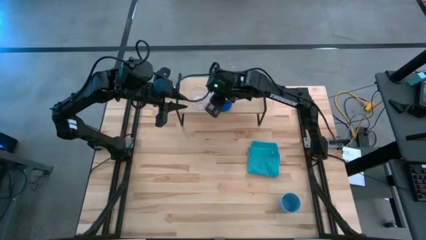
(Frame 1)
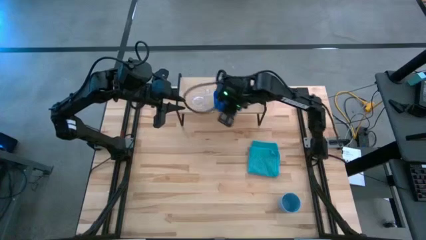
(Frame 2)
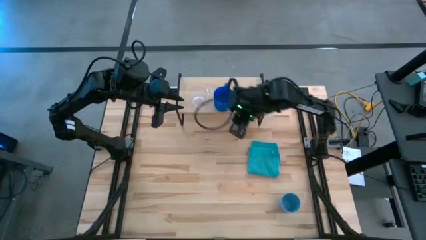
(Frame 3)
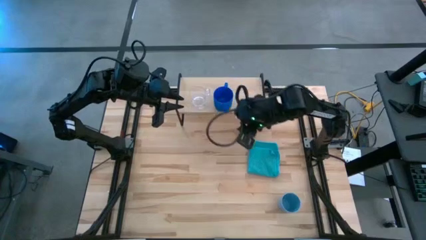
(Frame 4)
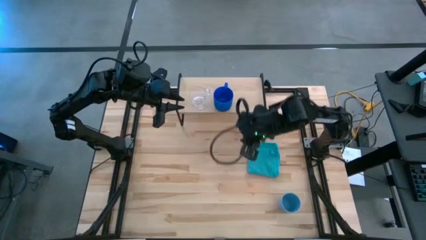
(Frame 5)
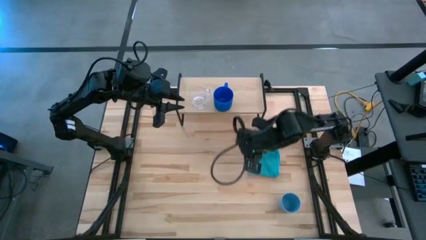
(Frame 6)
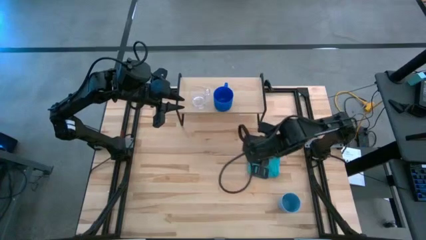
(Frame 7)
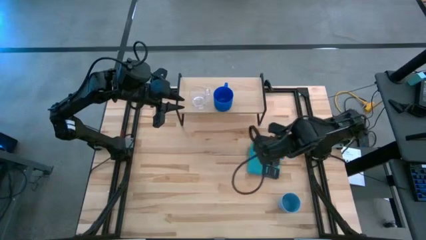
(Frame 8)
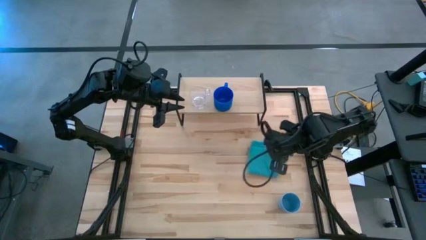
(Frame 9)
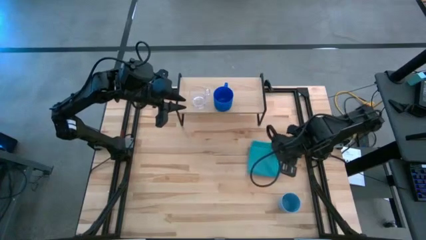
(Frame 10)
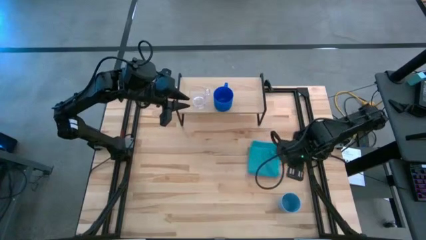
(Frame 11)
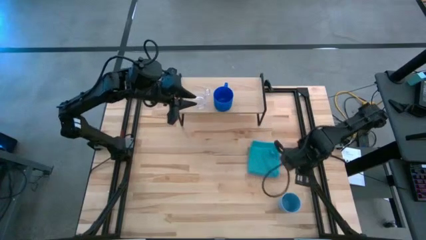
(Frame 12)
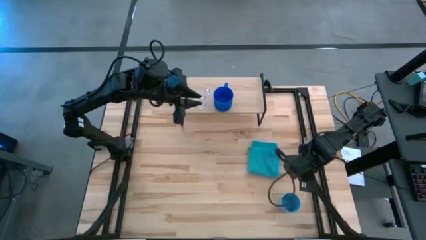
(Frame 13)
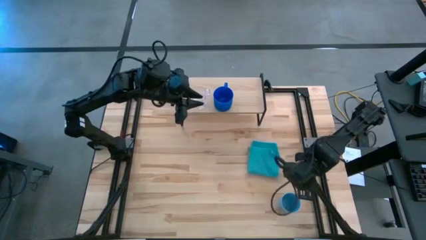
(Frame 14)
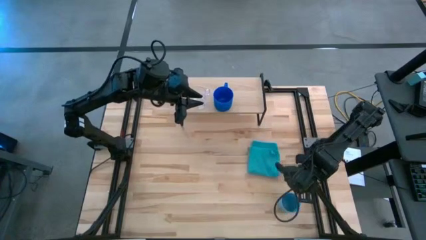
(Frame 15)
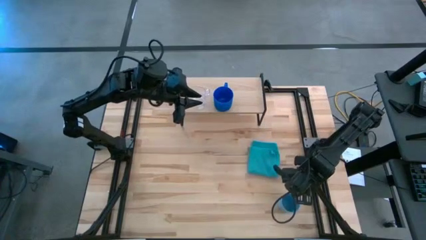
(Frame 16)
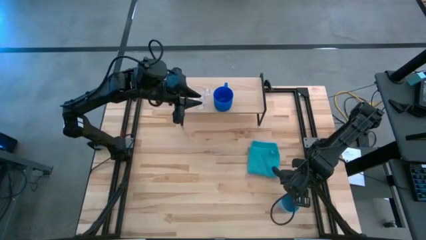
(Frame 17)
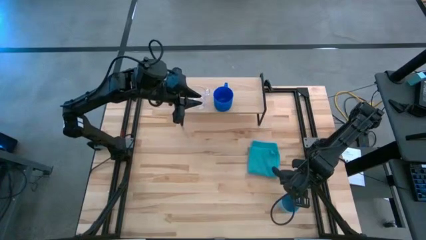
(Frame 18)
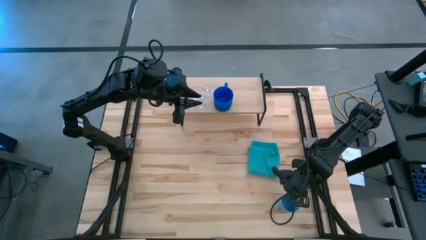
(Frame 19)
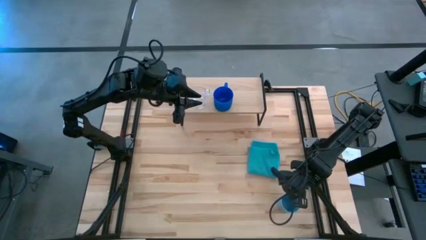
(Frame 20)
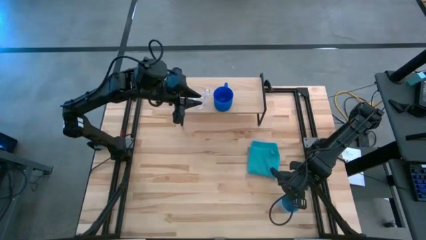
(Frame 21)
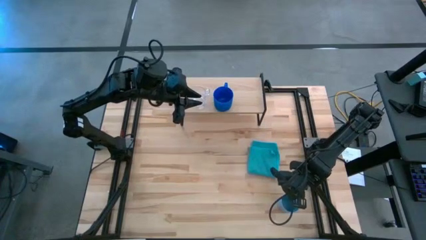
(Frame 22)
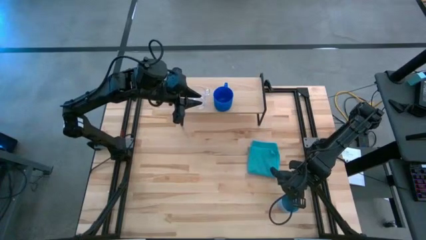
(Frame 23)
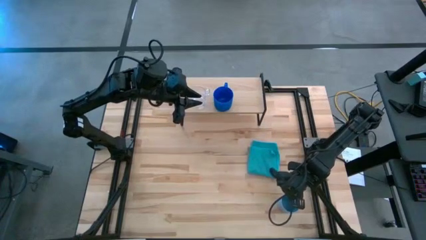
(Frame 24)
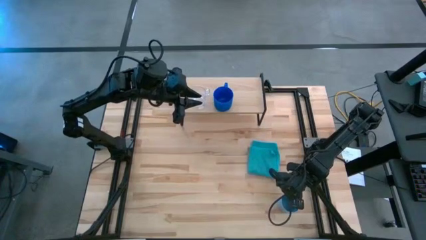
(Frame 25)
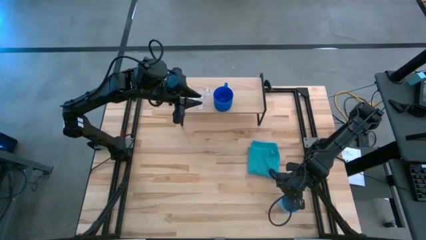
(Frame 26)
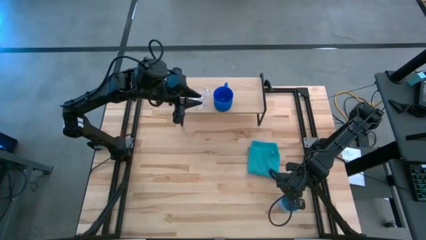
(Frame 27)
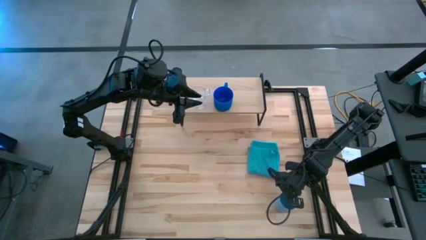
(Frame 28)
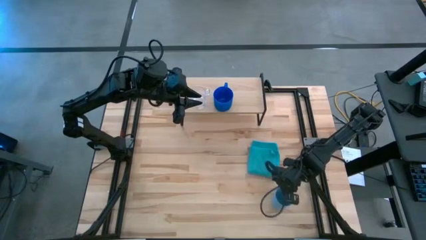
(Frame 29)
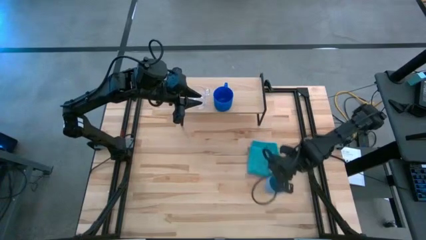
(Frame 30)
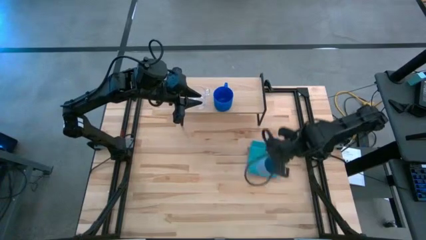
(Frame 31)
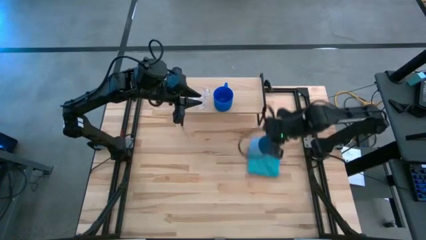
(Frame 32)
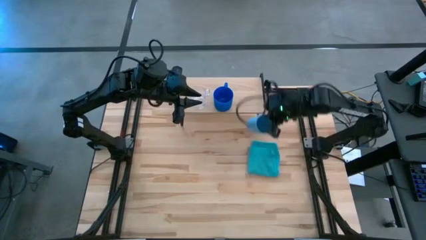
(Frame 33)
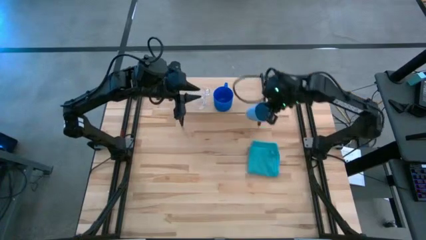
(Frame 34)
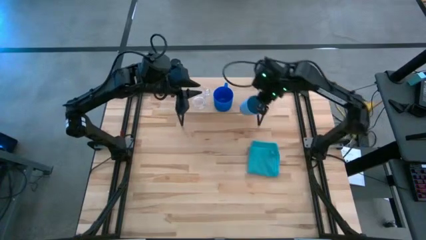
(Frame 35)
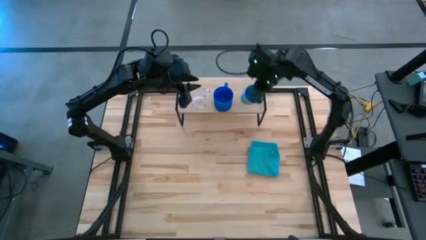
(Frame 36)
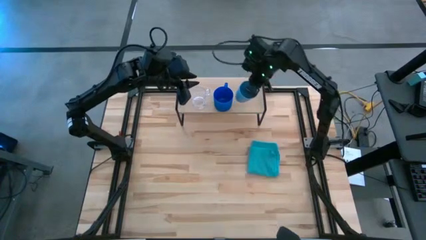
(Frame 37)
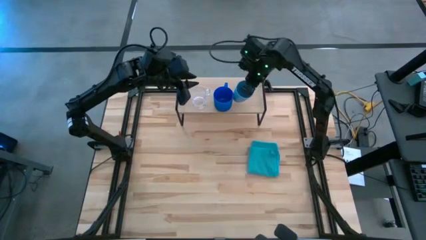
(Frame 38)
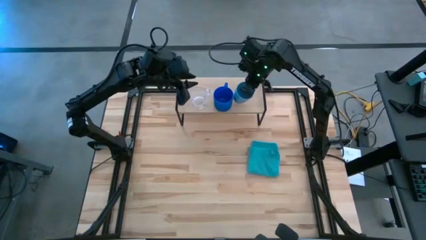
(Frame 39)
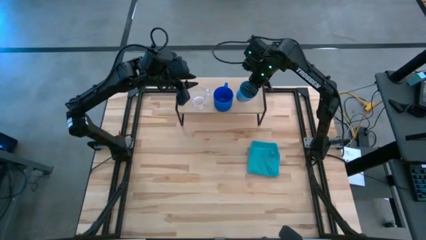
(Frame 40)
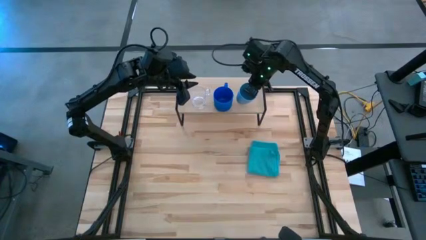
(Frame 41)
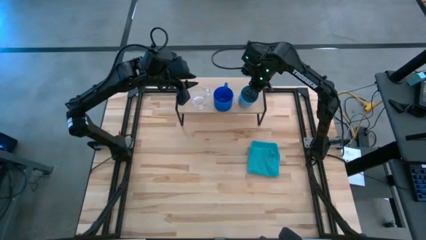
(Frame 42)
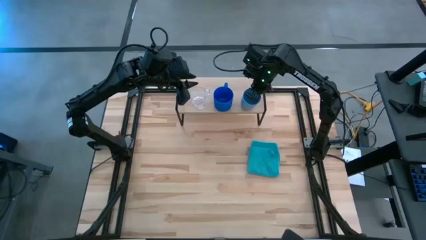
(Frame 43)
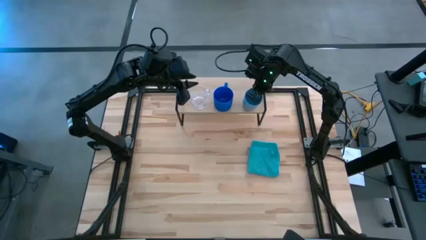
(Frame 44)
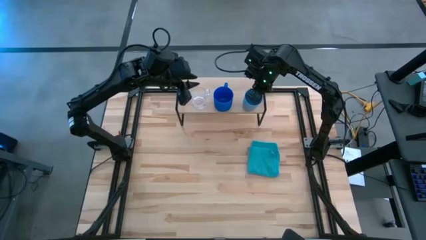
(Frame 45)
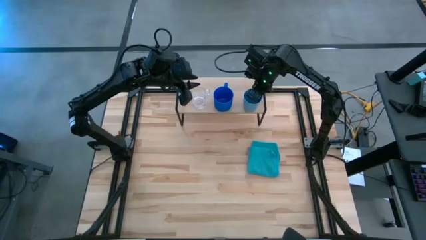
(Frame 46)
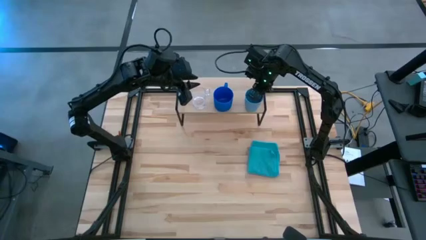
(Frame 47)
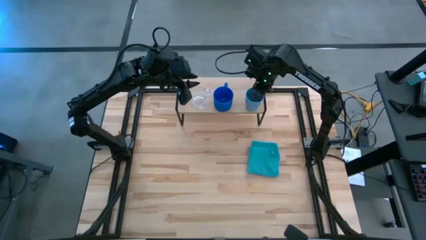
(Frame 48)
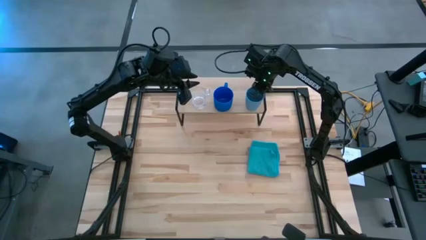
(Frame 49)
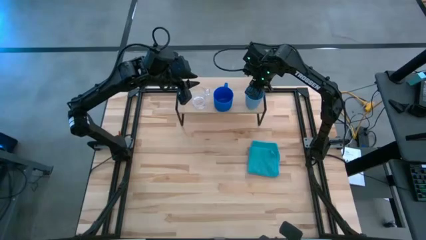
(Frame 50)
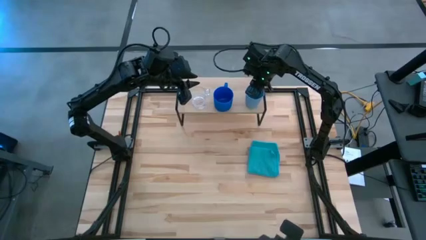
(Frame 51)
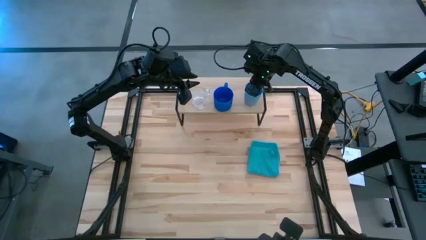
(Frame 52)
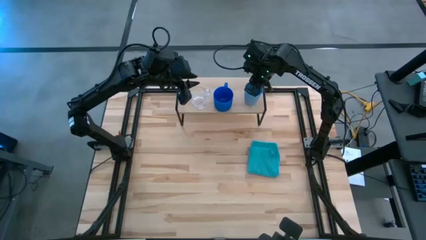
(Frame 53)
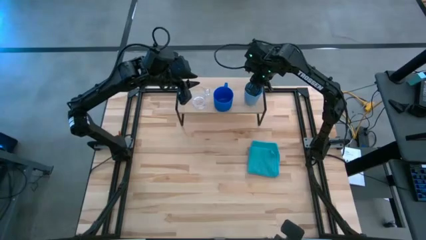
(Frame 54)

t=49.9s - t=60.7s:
Task: Stack small to large cups/mugs on shelf
Put the light blue cup on the shelf

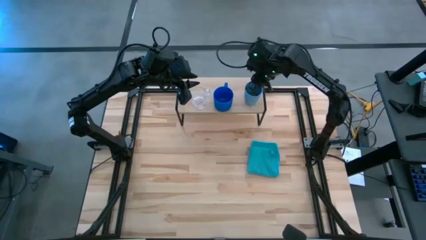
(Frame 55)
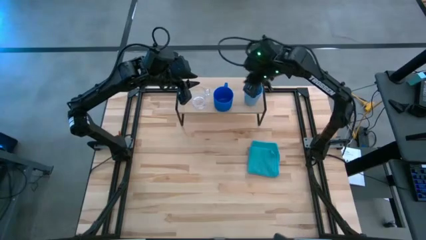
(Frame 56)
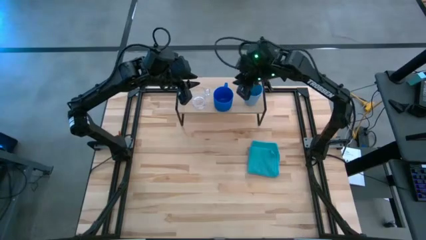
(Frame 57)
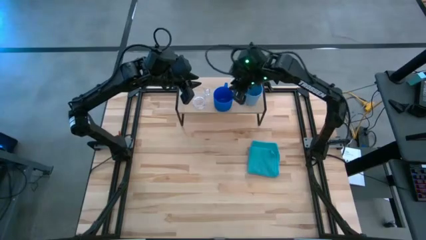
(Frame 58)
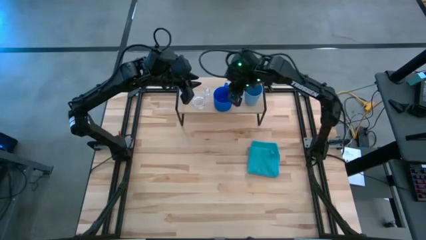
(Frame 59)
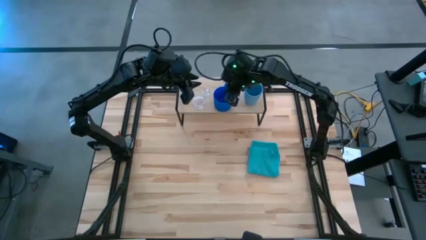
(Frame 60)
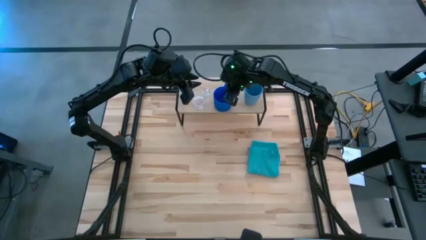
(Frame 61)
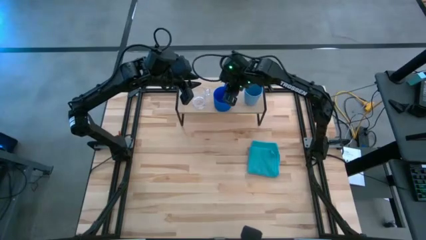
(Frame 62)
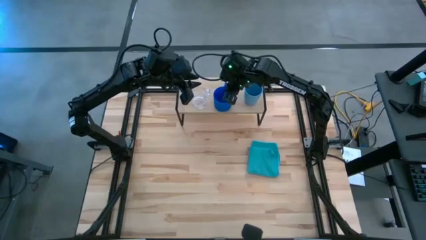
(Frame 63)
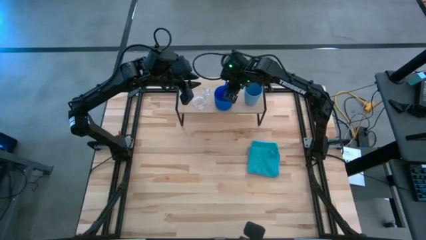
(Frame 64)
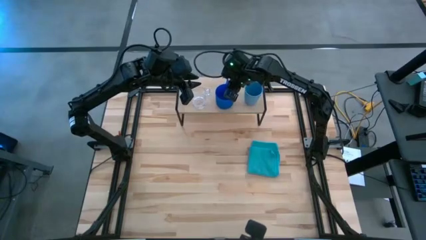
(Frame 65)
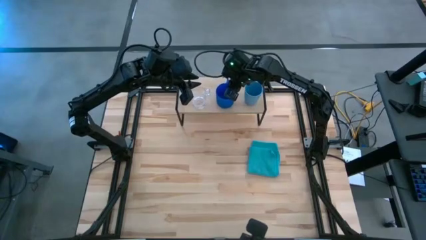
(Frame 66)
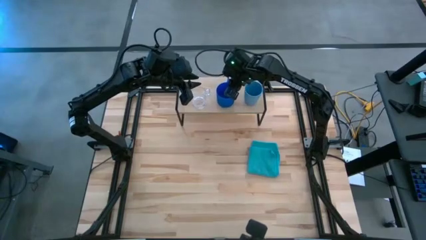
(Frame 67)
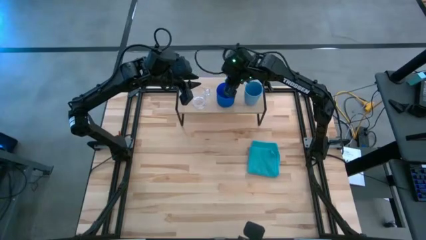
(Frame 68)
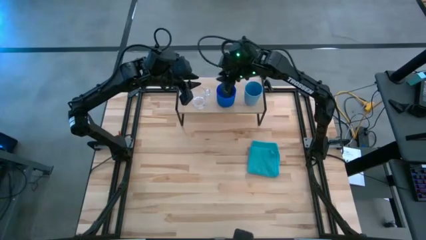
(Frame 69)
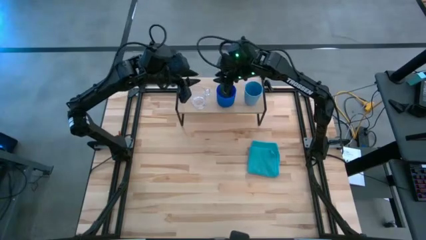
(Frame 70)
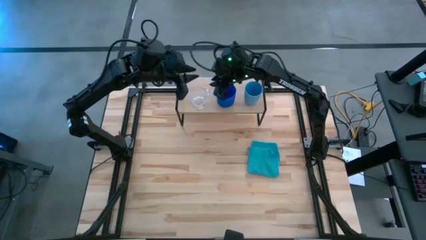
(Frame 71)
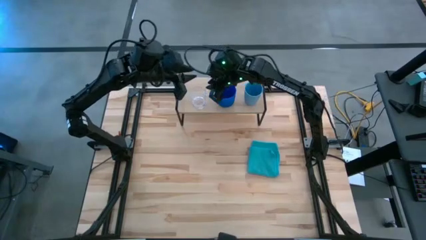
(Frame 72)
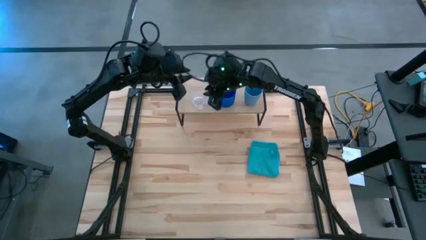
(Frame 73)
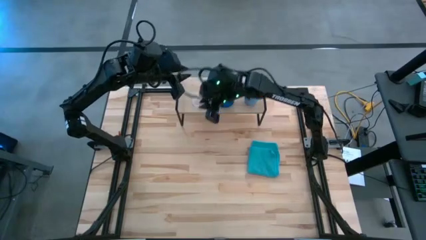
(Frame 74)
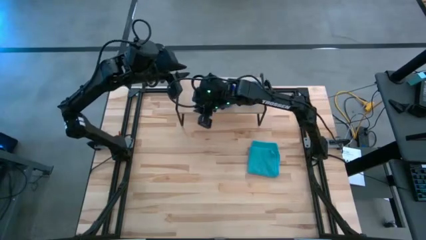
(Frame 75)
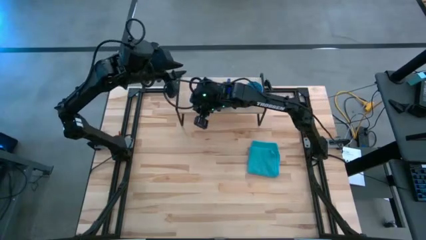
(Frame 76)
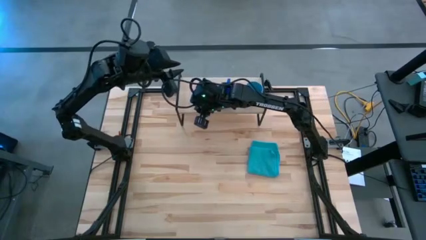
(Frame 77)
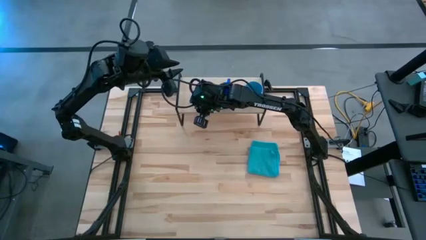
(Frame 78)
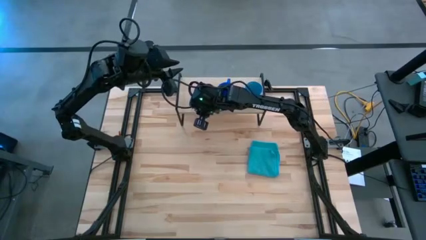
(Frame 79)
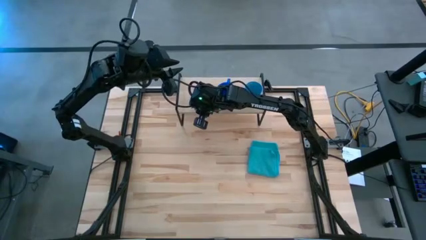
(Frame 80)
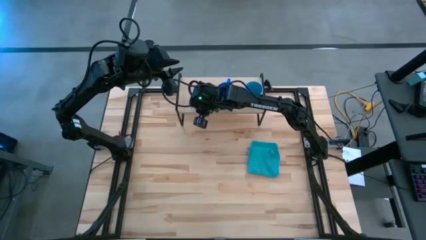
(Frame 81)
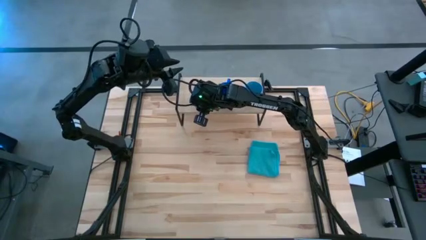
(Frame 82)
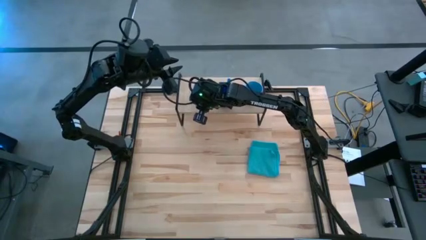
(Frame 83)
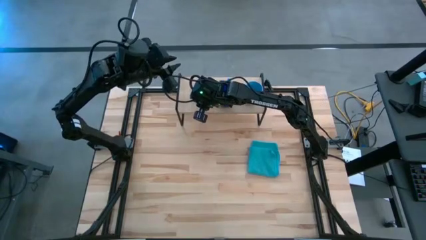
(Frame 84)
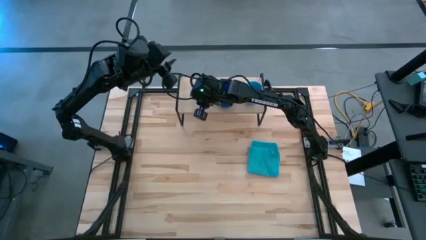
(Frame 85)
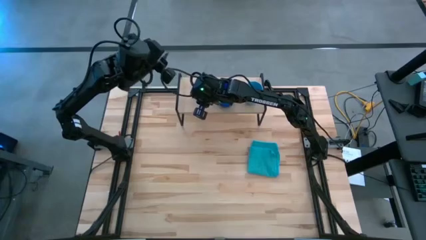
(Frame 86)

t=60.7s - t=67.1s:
Adjust the mugs on the shelf
